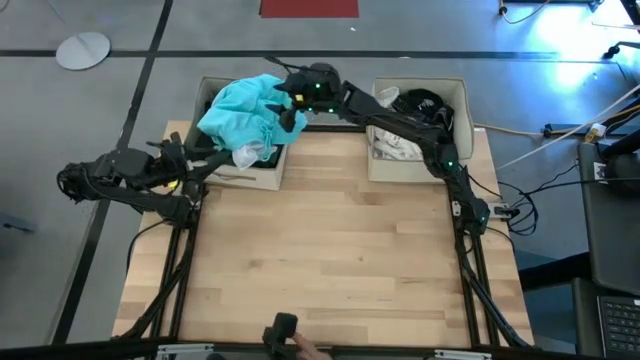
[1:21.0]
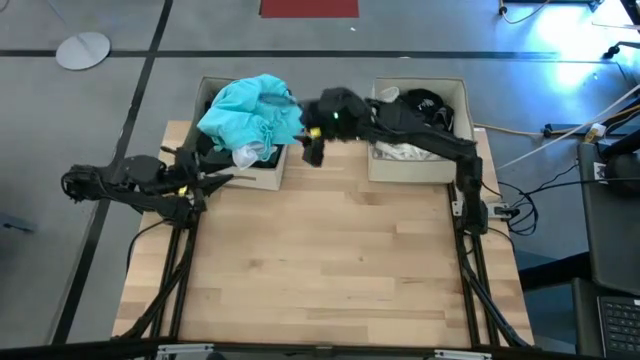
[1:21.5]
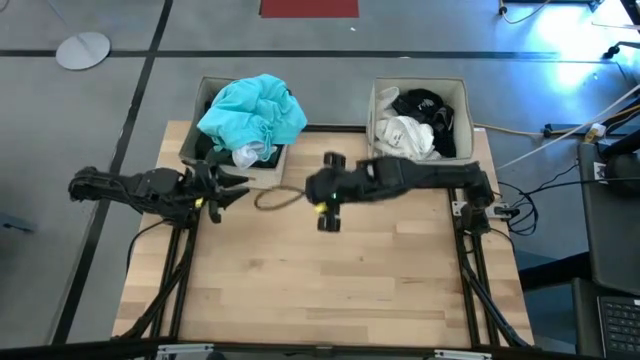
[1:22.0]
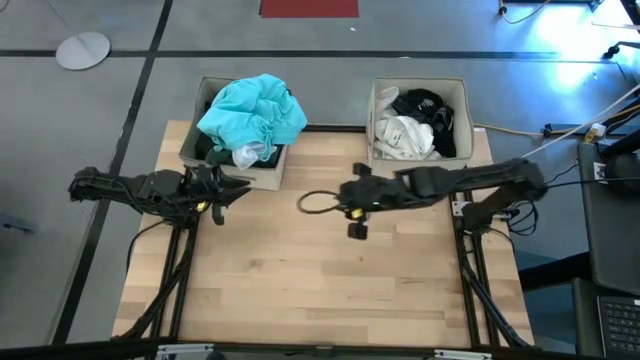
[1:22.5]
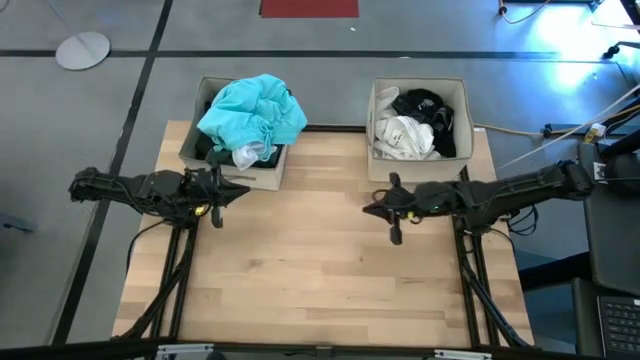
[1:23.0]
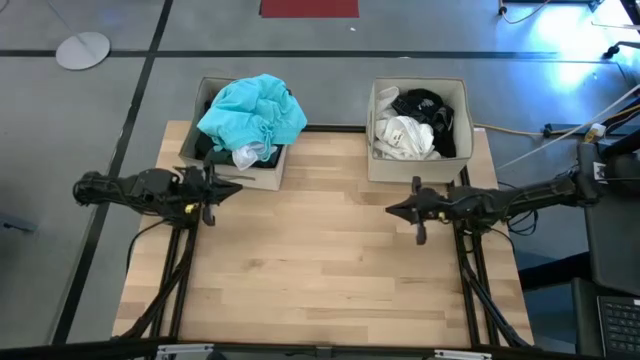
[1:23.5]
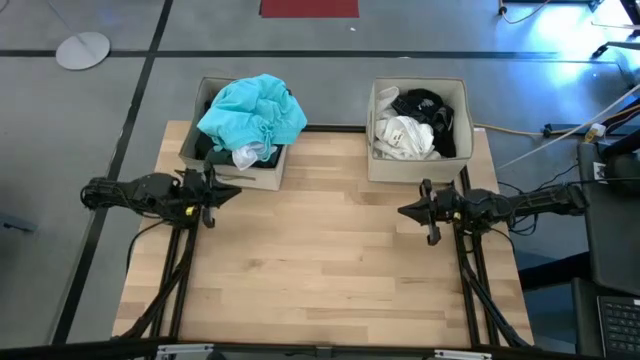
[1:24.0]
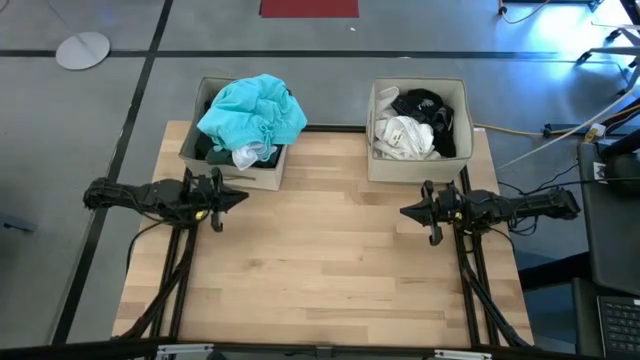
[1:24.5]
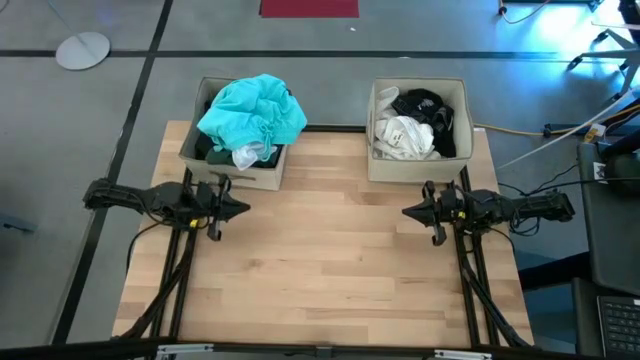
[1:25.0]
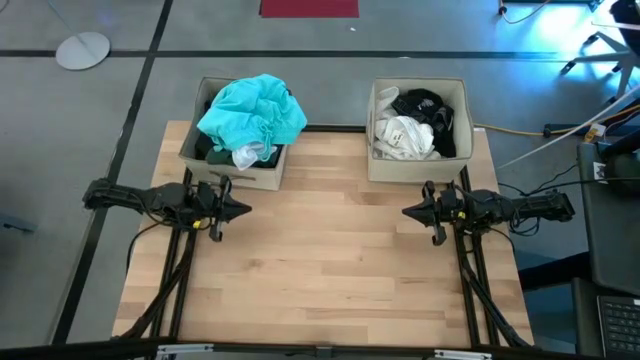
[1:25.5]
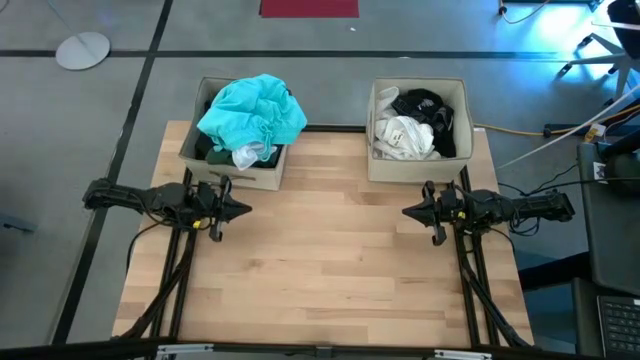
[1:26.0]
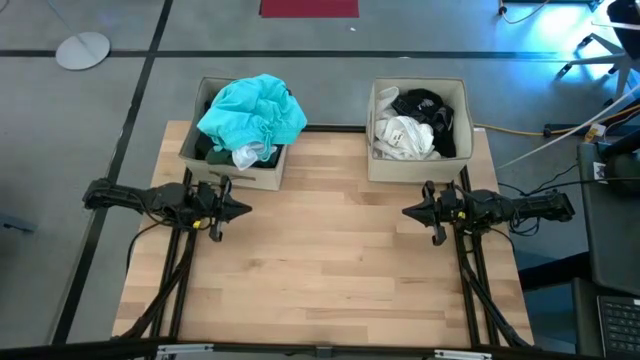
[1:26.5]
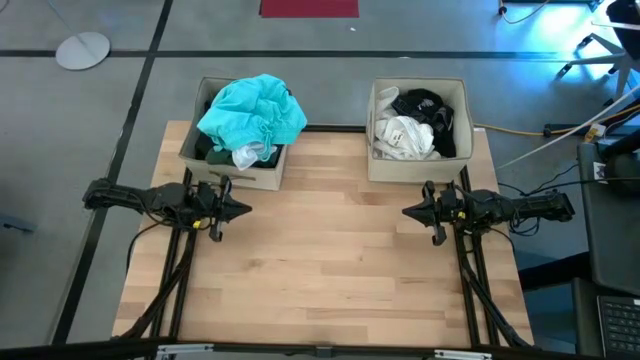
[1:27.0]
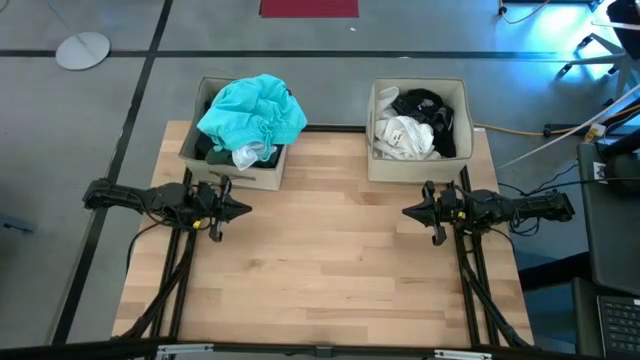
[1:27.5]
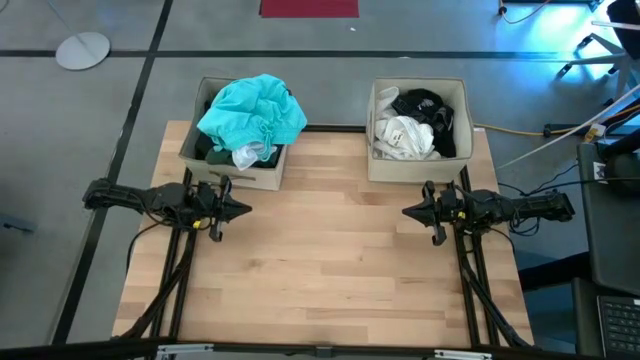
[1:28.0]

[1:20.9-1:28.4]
Task: Sort clothes
Return to Home Position

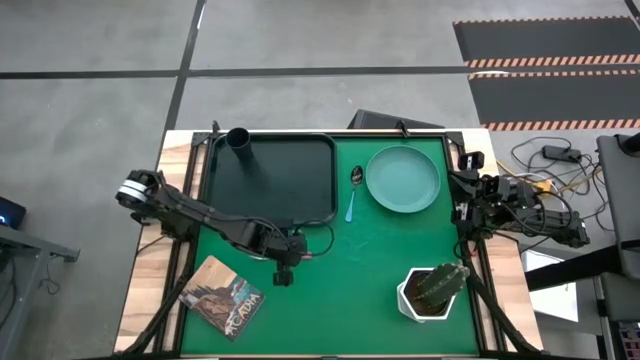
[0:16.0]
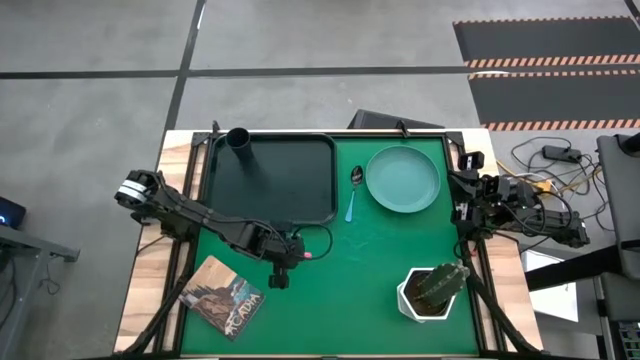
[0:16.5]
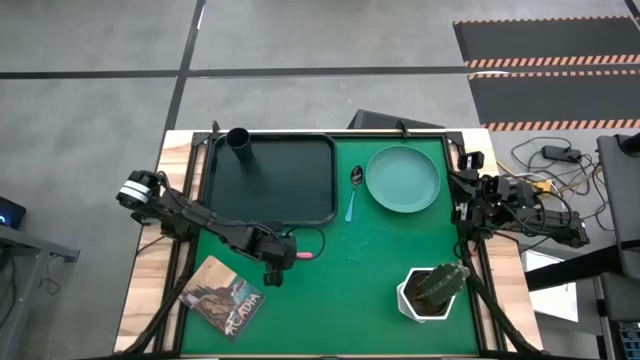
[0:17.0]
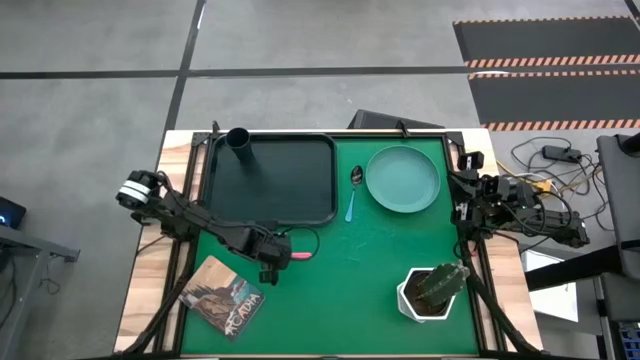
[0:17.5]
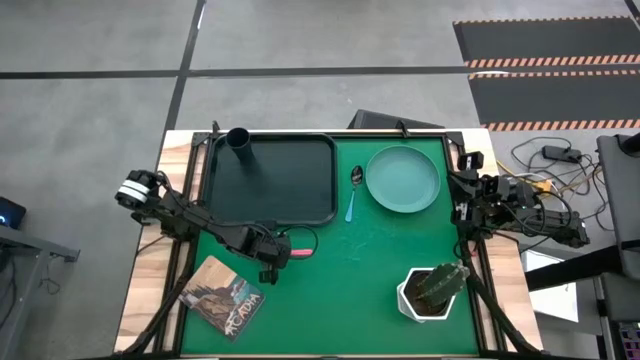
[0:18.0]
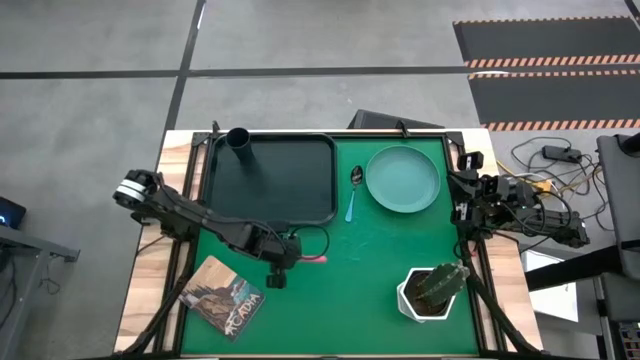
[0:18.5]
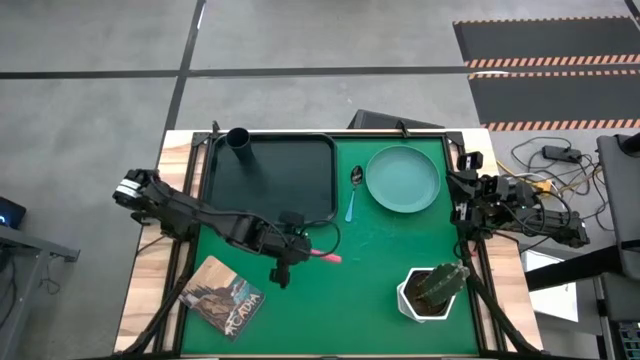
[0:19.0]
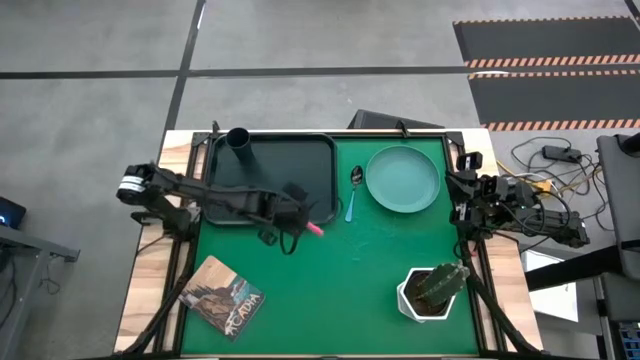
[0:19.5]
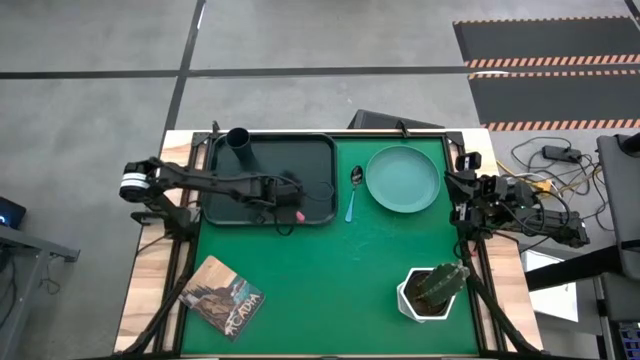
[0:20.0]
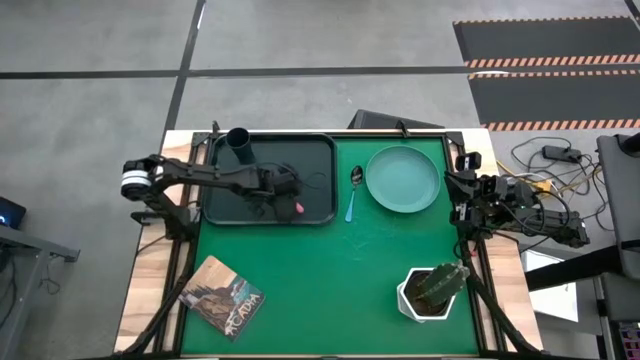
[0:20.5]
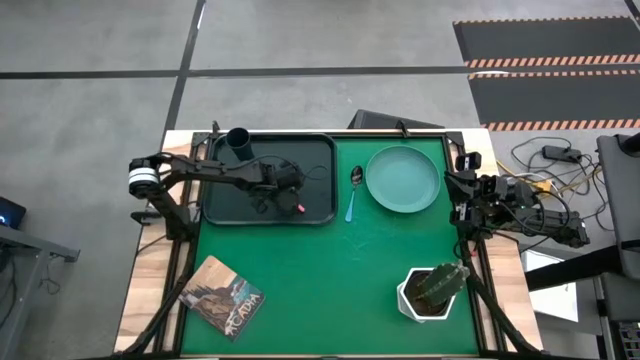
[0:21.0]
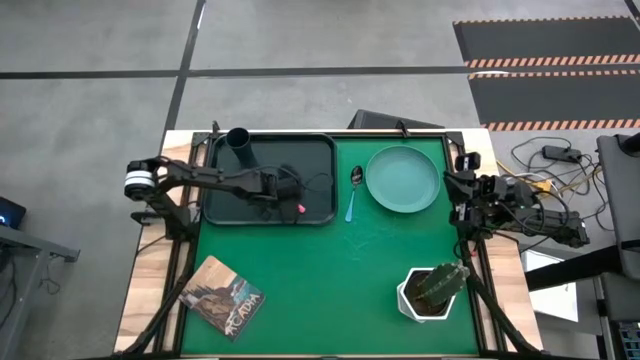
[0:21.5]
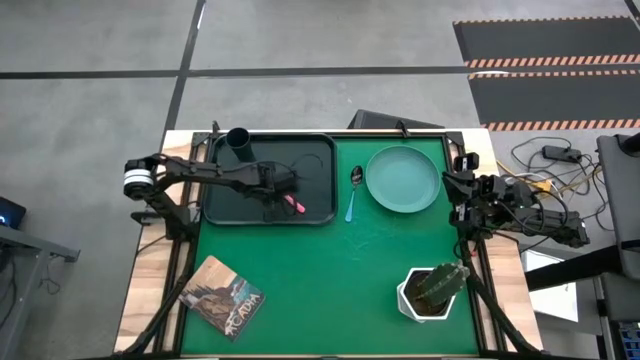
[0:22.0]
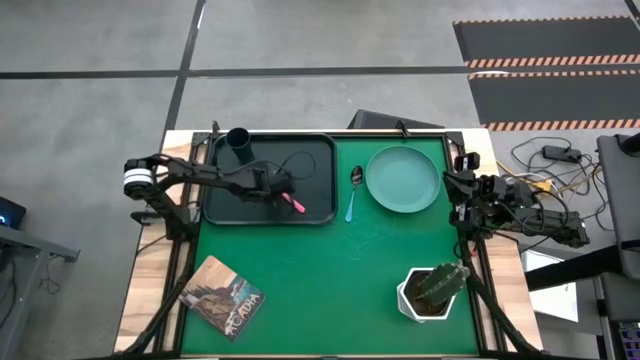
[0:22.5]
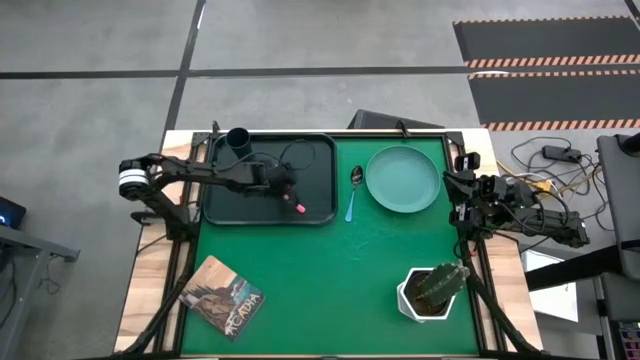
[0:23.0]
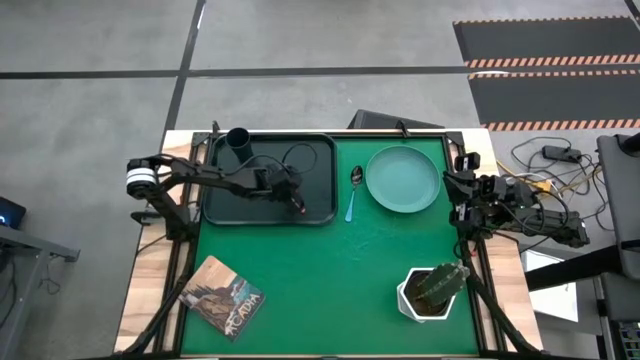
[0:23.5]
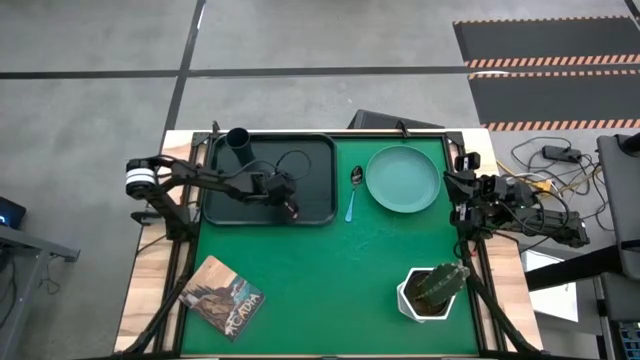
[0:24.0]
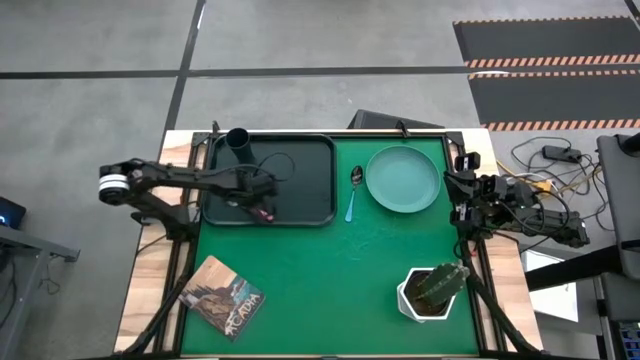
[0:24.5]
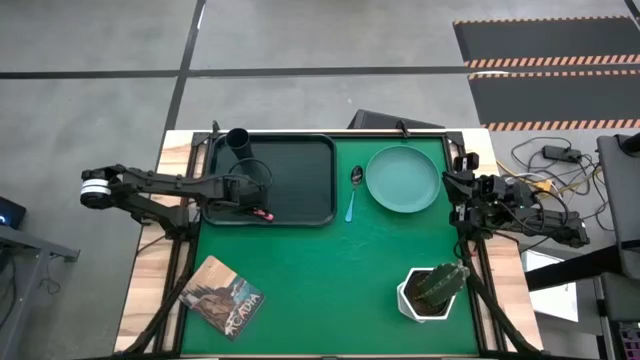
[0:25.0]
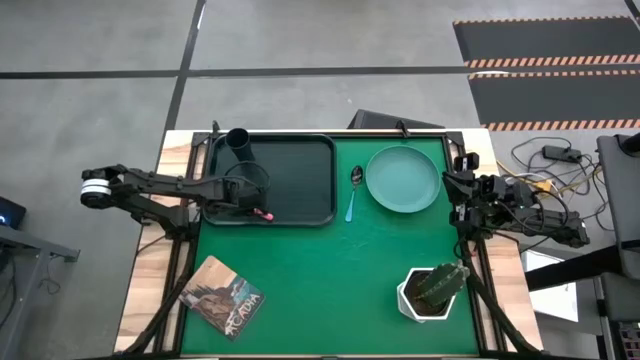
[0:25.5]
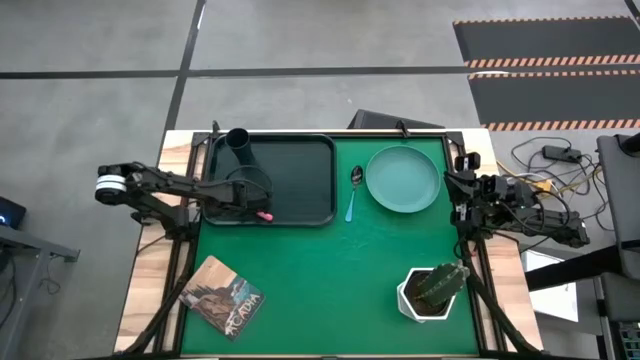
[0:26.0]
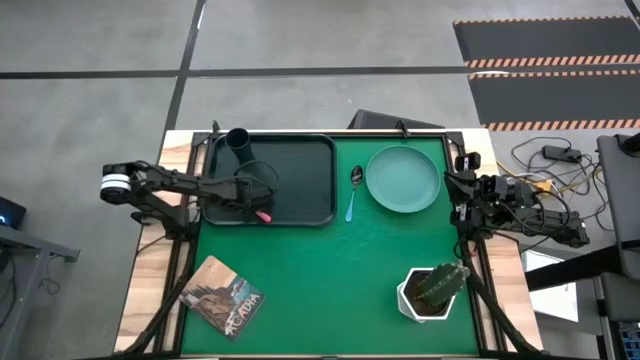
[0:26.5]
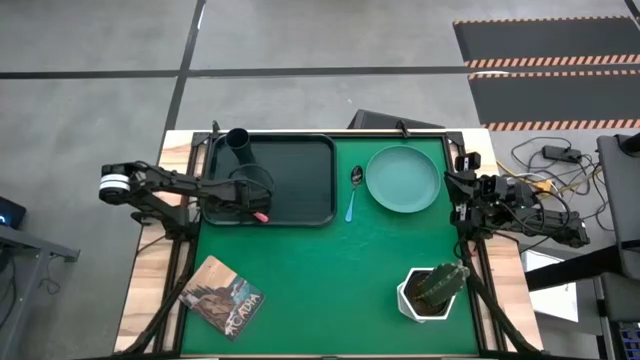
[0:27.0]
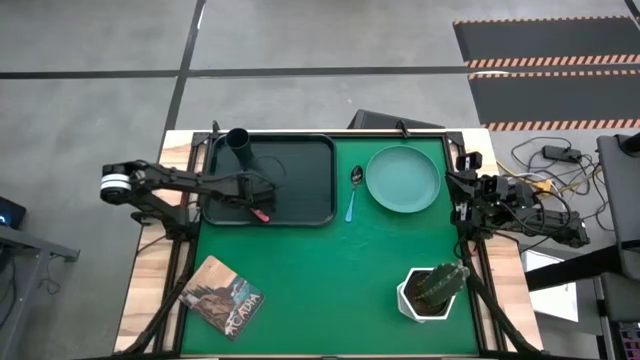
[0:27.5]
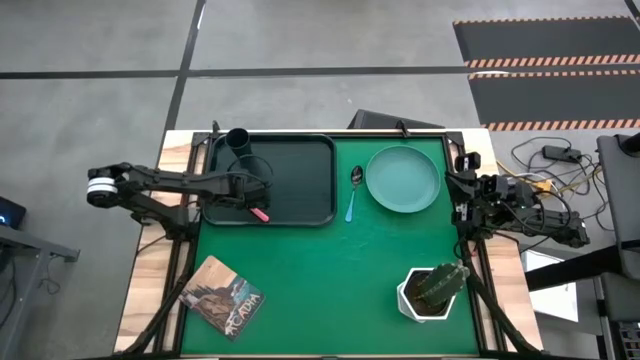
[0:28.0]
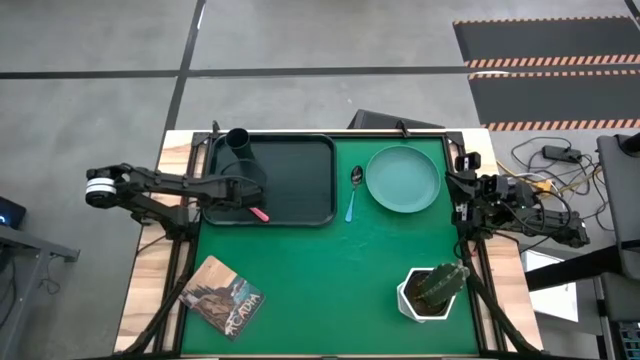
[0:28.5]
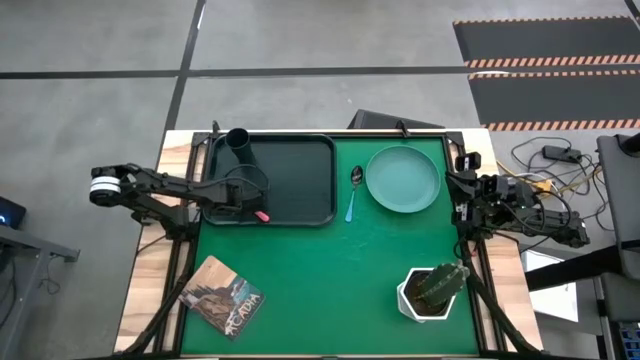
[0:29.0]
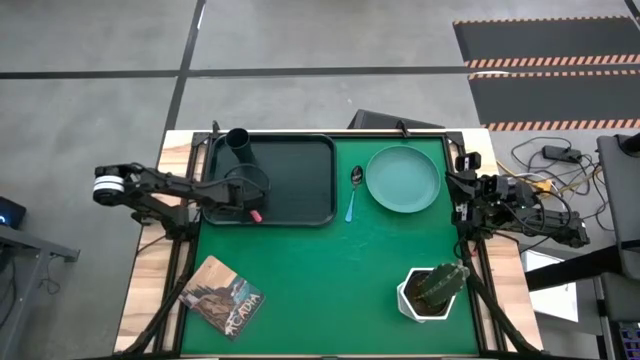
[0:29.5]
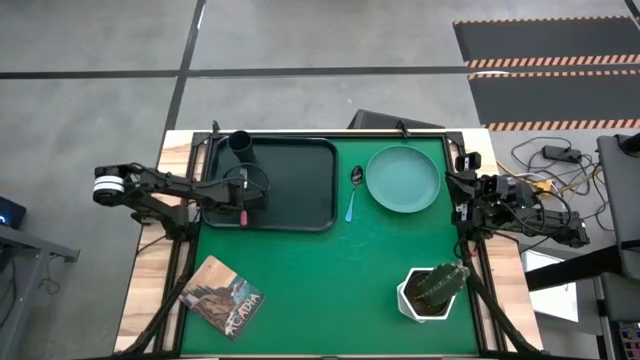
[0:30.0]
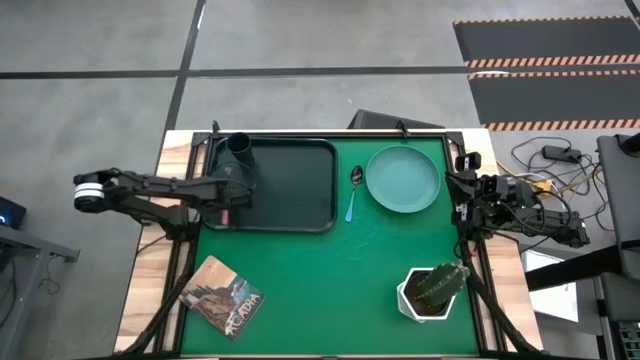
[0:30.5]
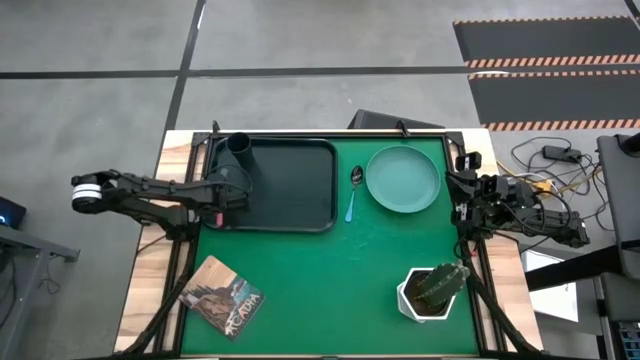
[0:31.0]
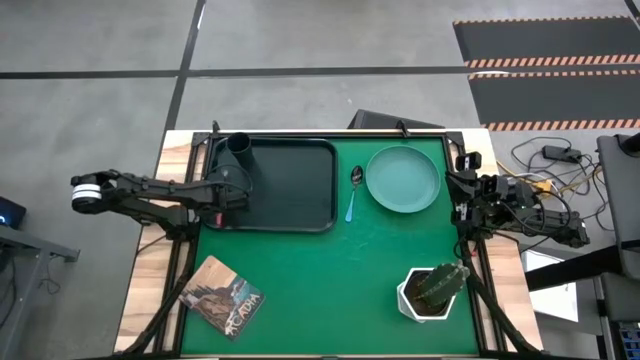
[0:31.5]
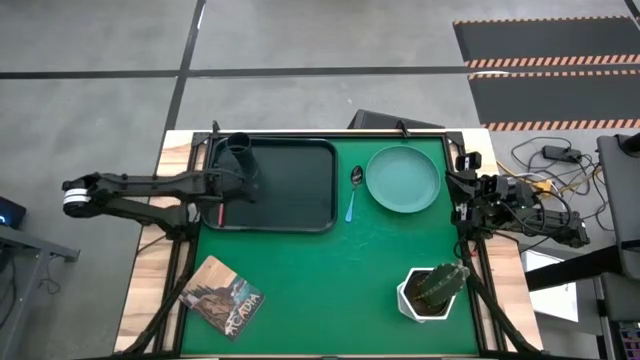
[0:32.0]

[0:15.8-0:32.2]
Task: Pick and place plate/cup/fork/spoon on tray
Put the pink fork on the black serving tray to the bottom of the black cup
